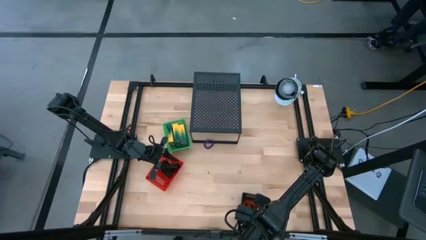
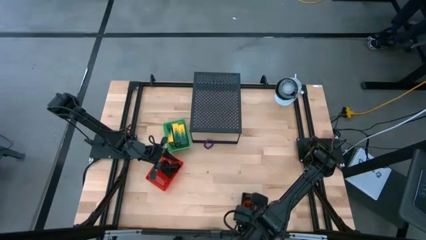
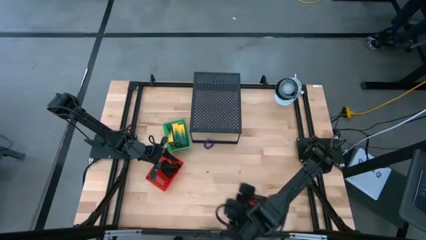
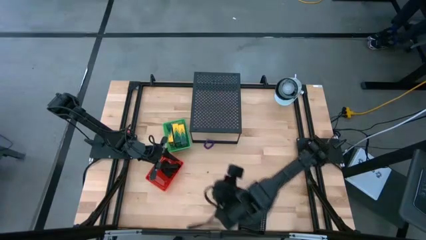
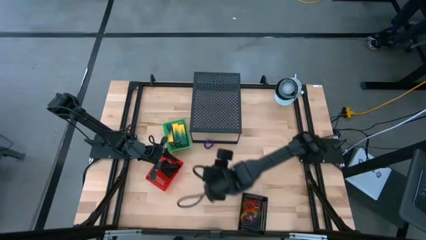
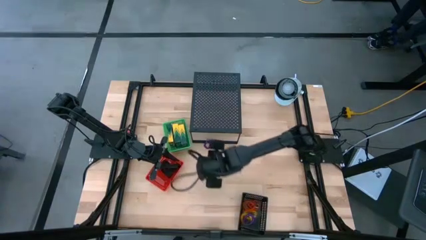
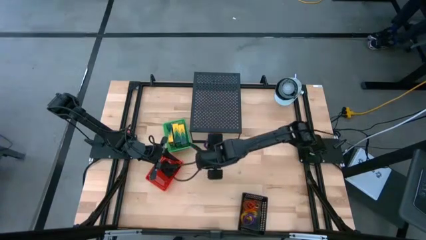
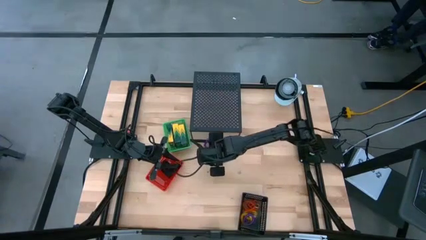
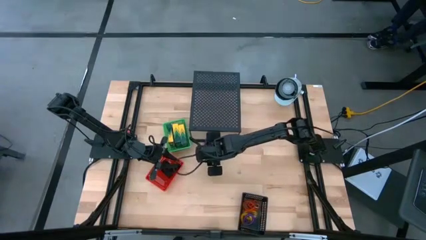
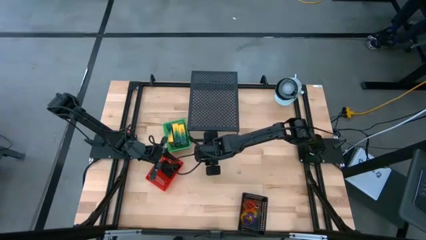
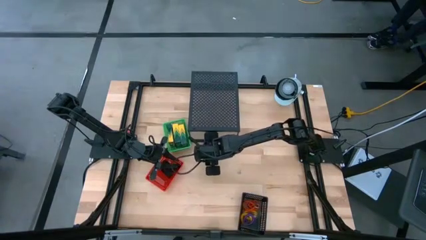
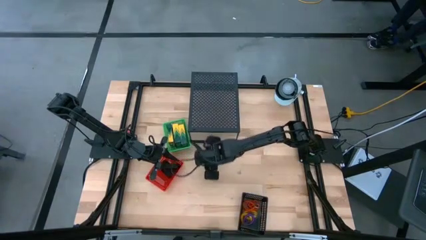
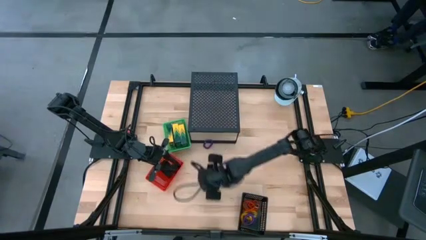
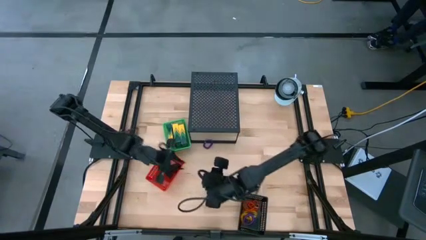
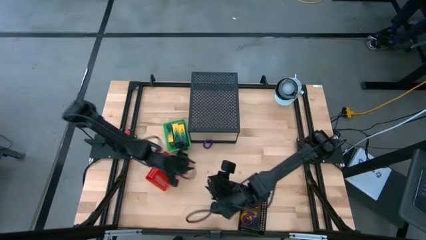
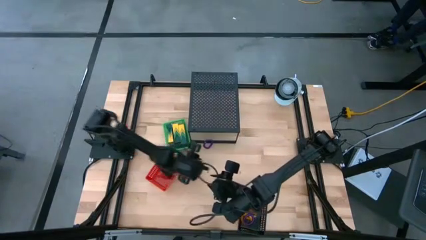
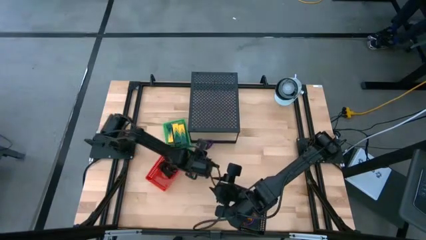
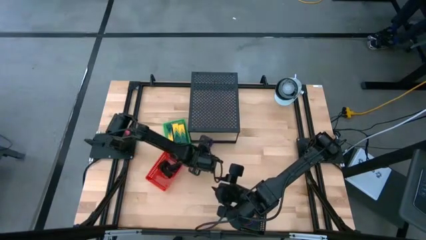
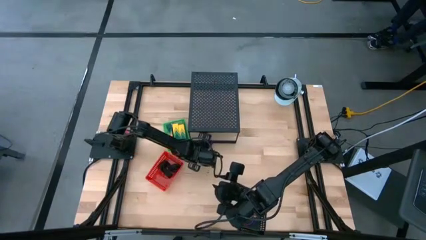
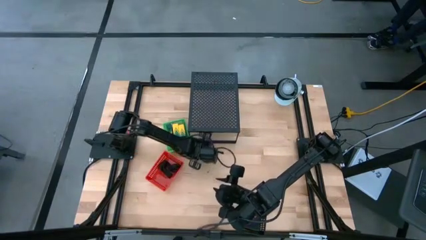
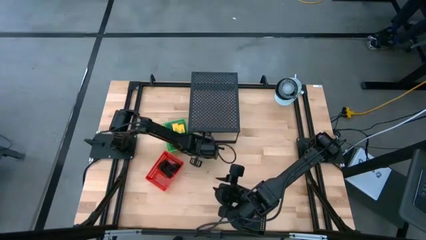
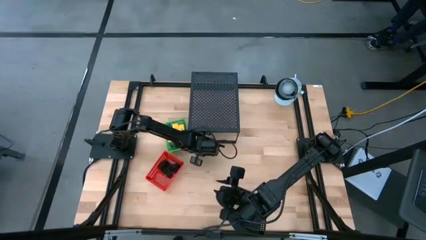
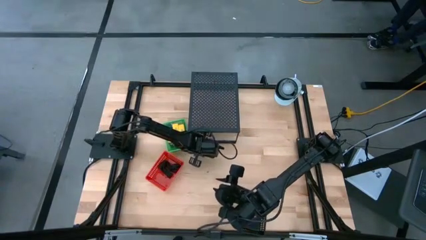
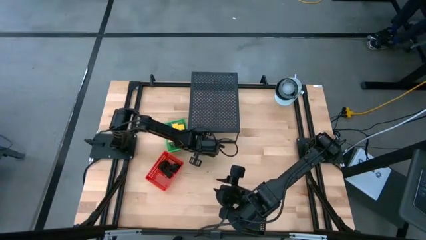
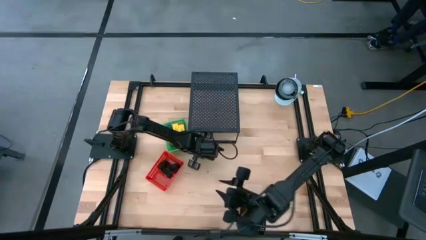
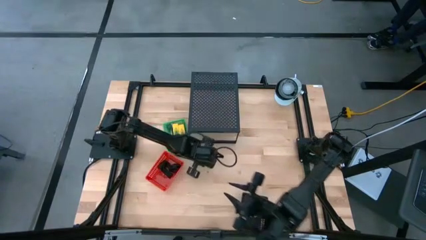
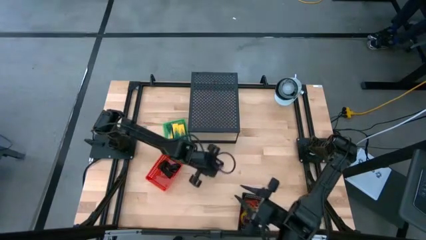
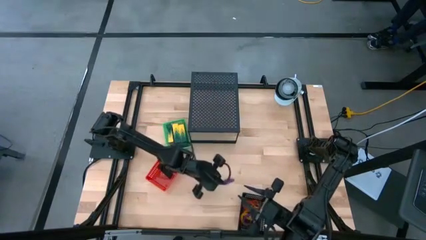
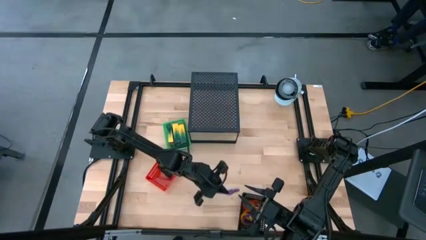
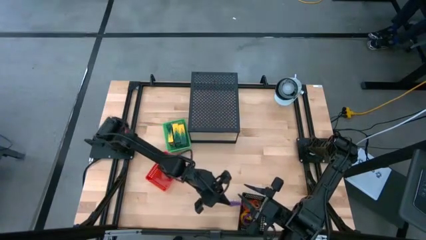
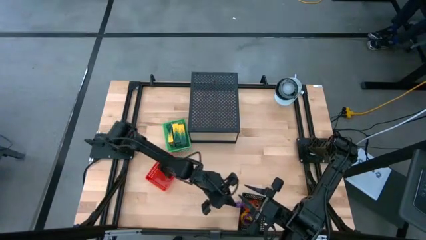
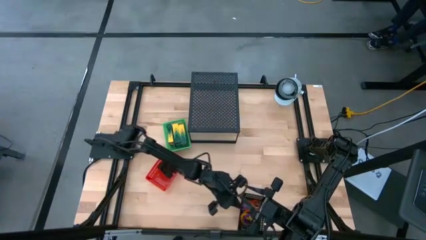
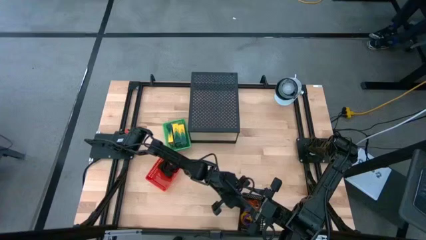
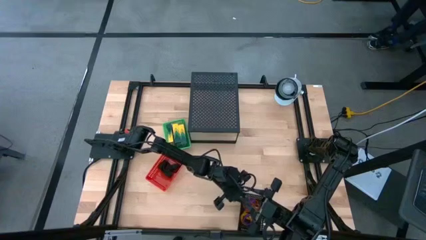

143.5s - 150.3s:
Task: Pick & Place Office Desk Supplies
Put the purple spring keychain into the black bin

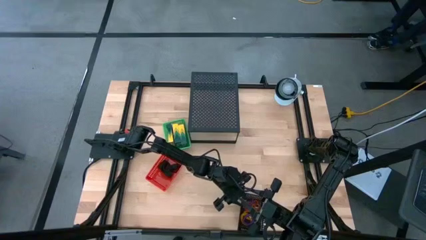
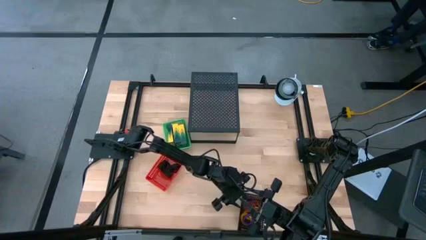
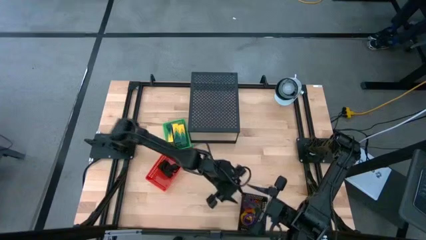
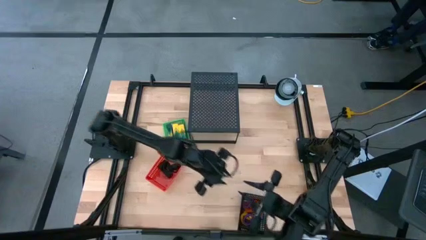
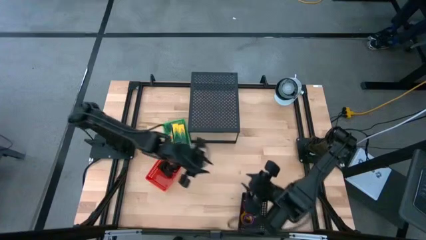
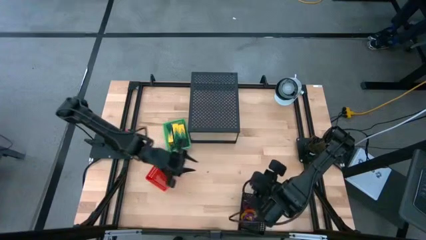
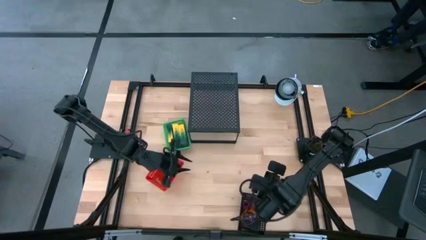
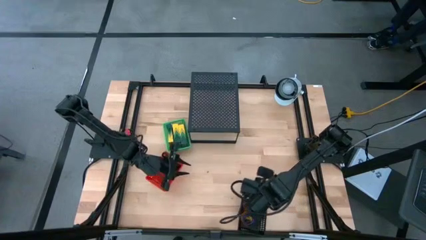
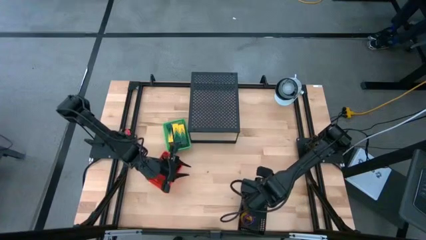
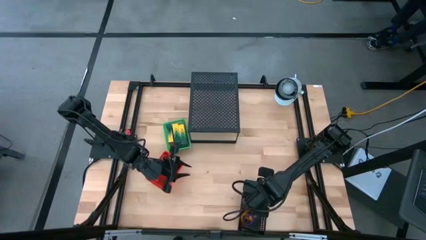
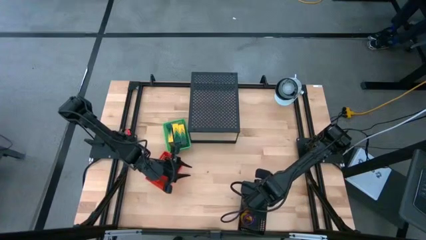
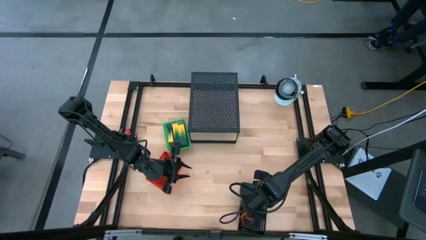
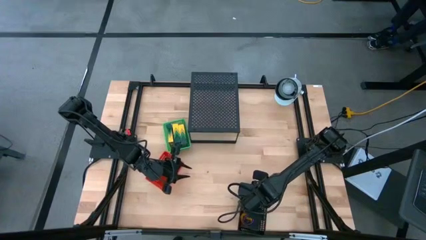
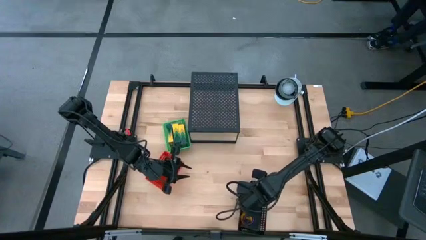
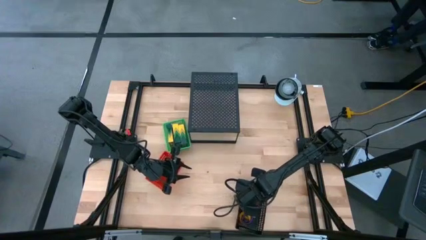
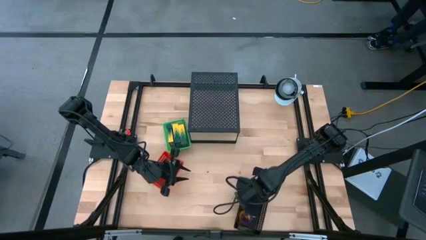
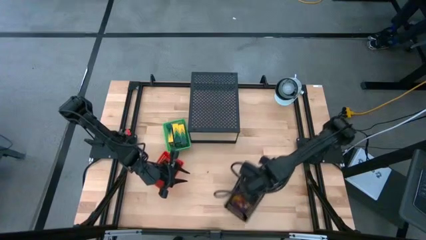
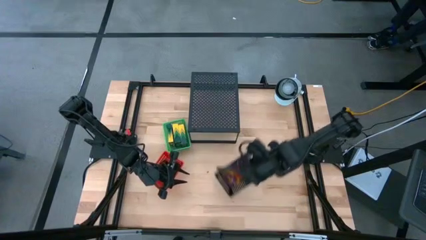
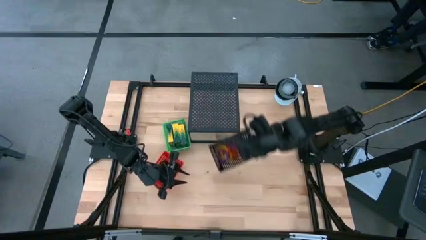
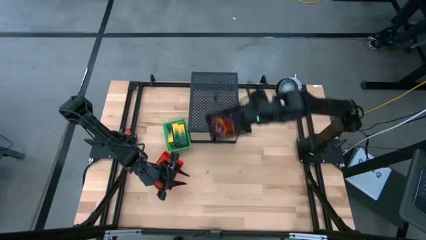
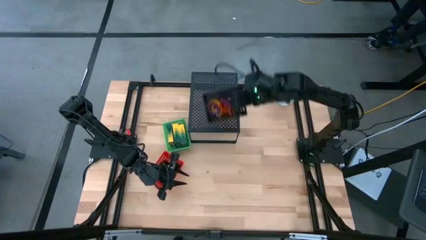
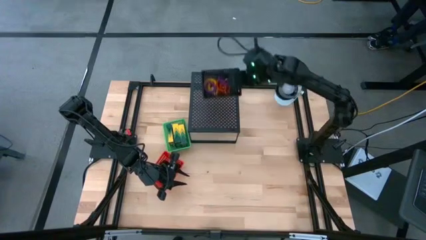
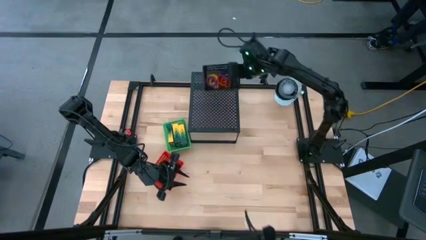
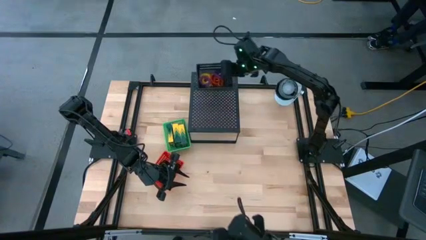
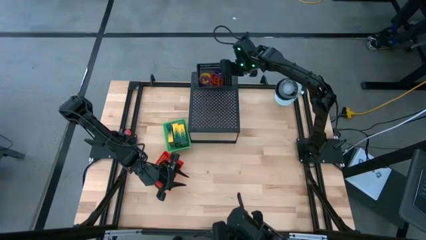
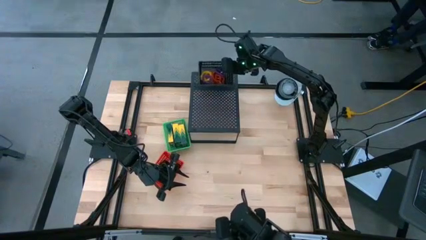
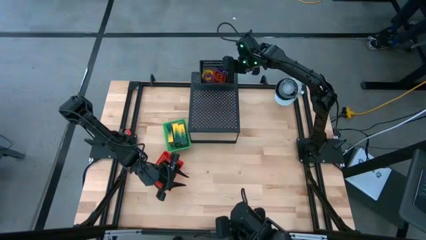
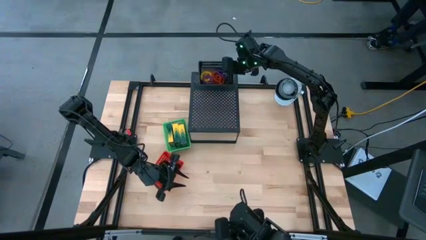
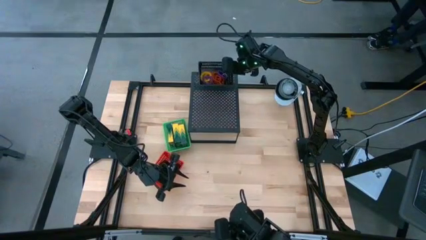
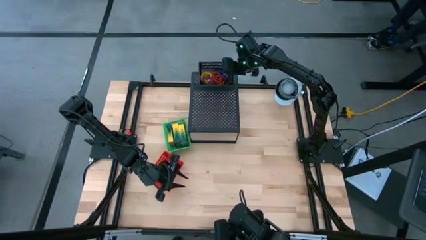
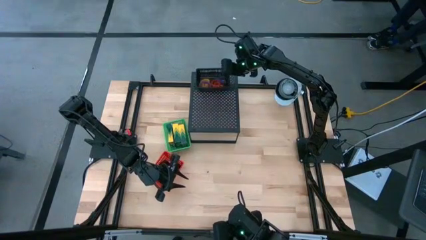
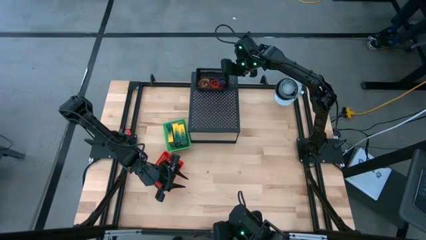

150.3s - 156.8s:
Put the black bin on the shelf
